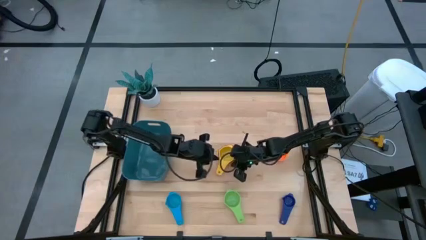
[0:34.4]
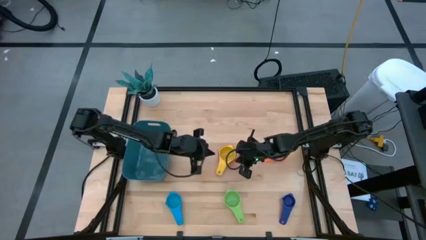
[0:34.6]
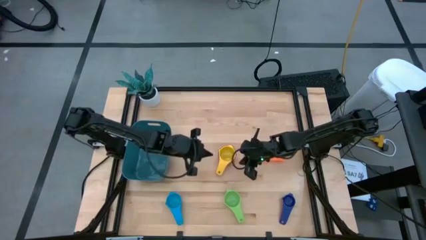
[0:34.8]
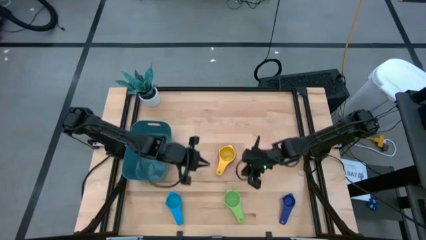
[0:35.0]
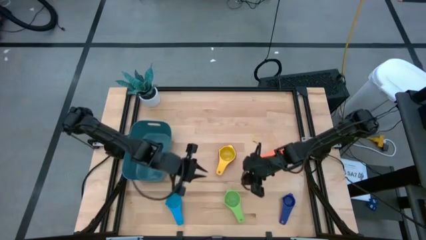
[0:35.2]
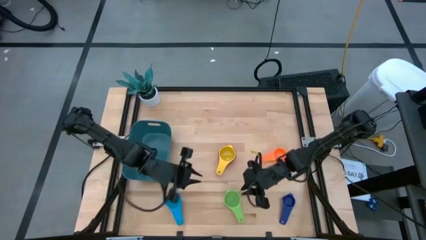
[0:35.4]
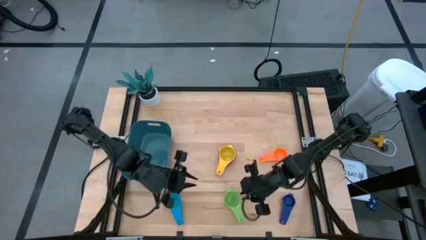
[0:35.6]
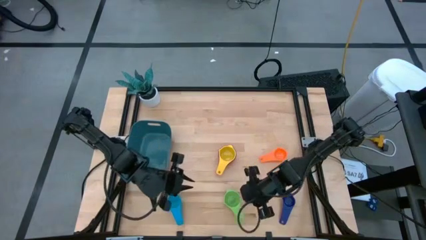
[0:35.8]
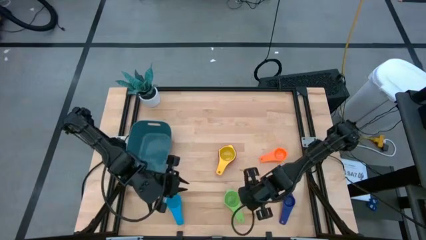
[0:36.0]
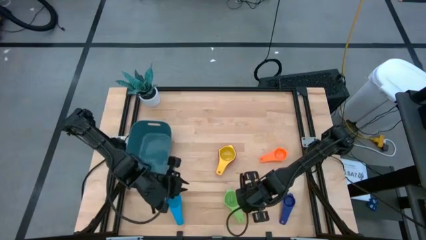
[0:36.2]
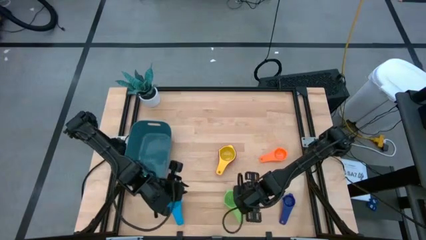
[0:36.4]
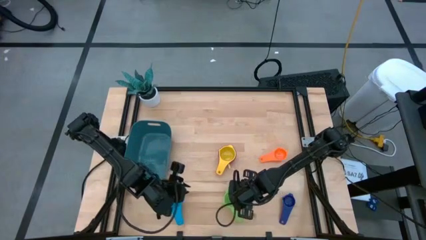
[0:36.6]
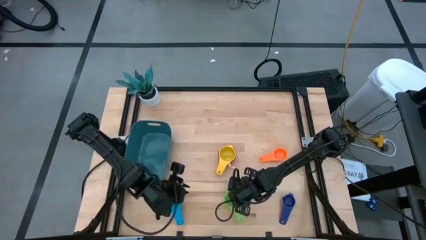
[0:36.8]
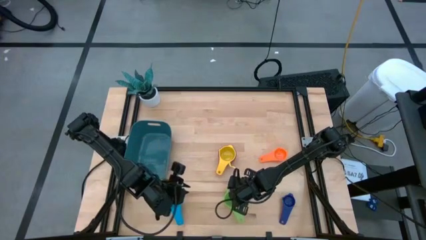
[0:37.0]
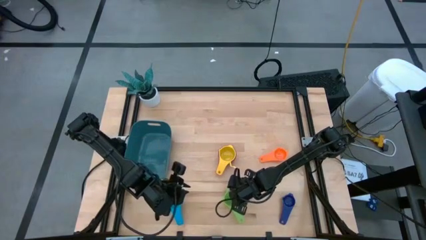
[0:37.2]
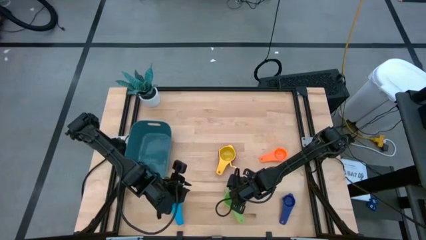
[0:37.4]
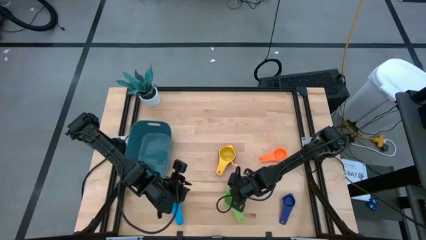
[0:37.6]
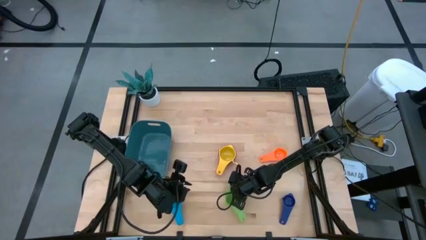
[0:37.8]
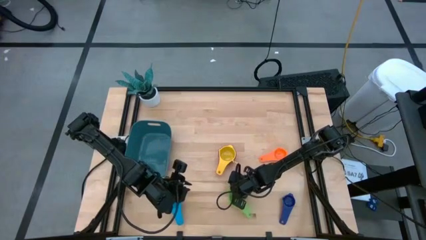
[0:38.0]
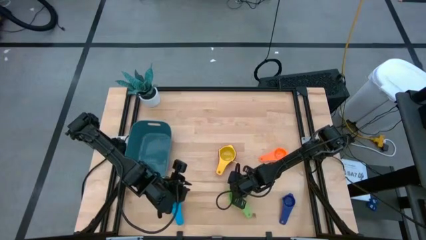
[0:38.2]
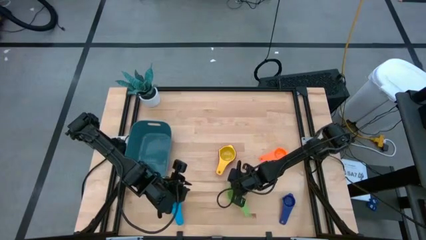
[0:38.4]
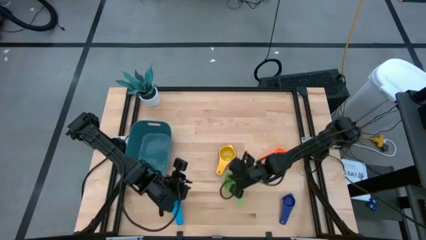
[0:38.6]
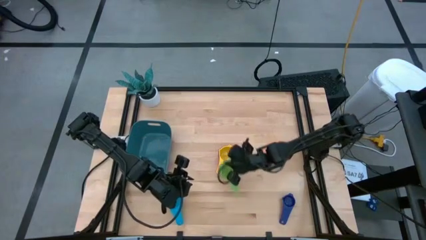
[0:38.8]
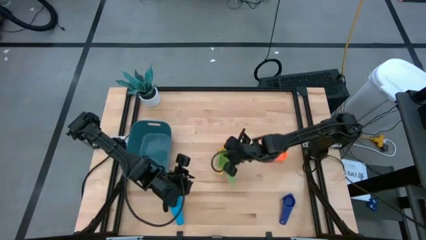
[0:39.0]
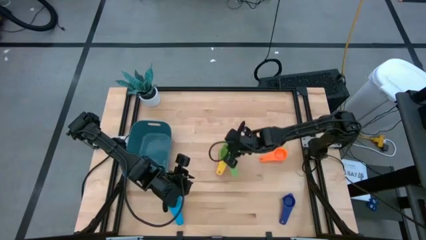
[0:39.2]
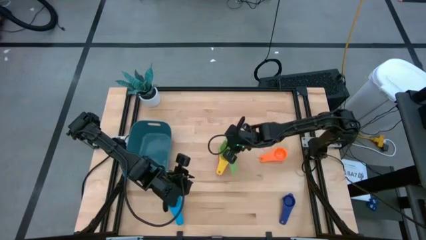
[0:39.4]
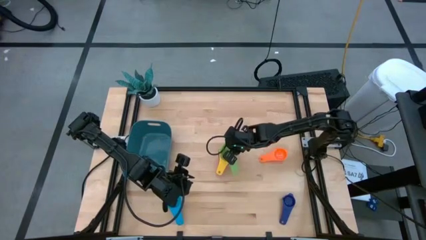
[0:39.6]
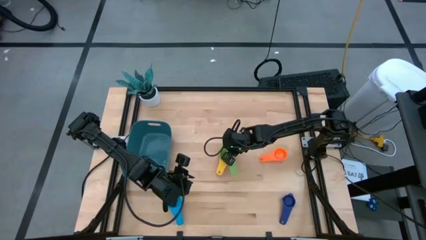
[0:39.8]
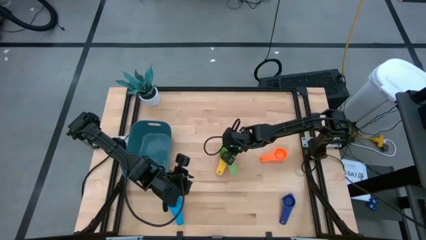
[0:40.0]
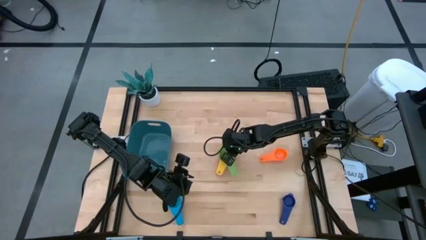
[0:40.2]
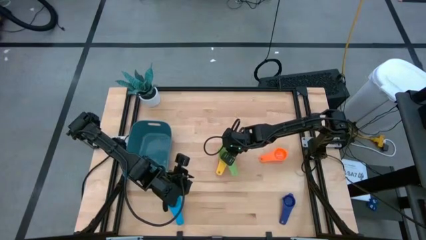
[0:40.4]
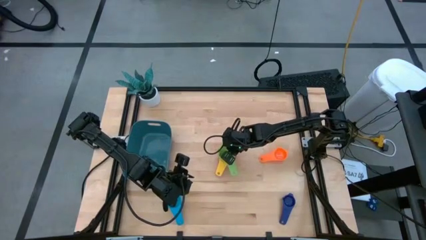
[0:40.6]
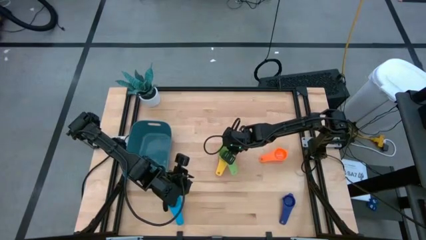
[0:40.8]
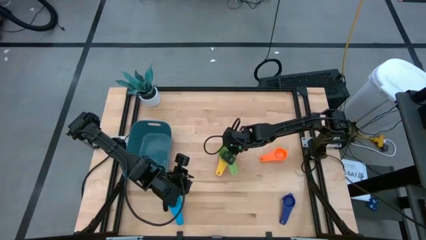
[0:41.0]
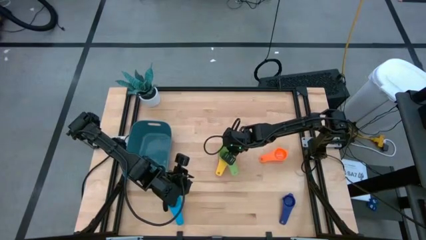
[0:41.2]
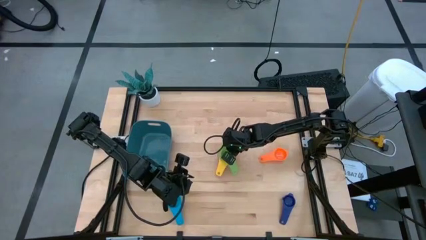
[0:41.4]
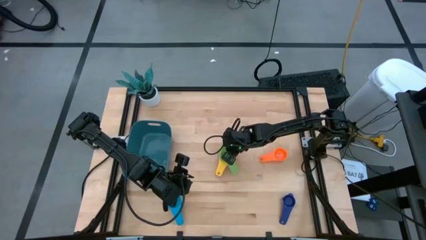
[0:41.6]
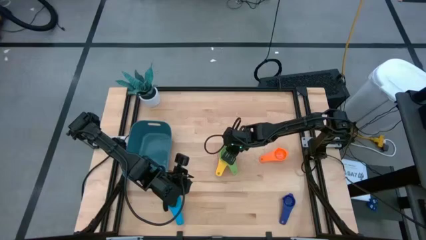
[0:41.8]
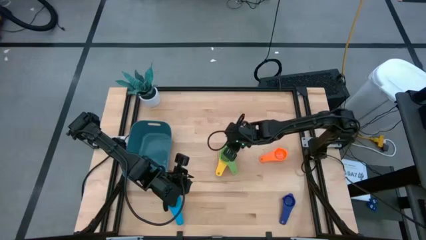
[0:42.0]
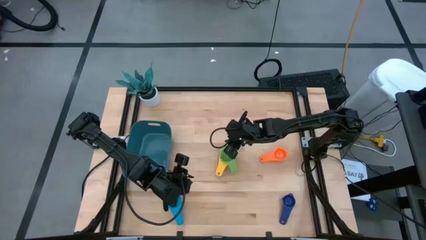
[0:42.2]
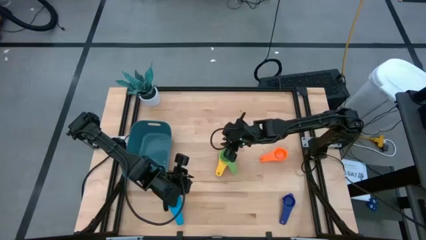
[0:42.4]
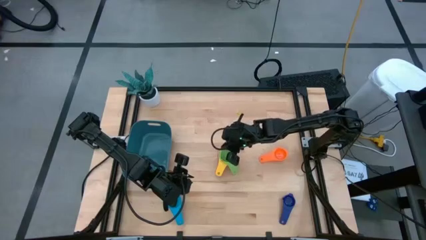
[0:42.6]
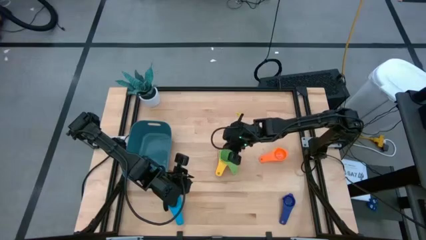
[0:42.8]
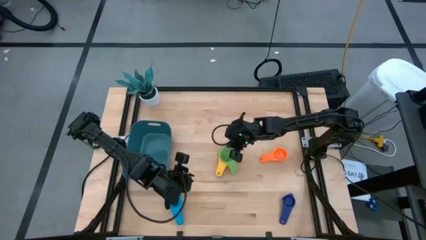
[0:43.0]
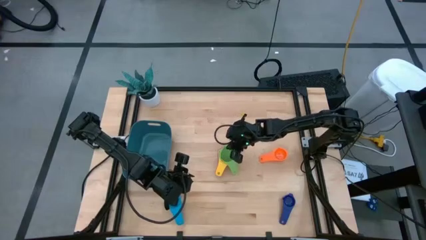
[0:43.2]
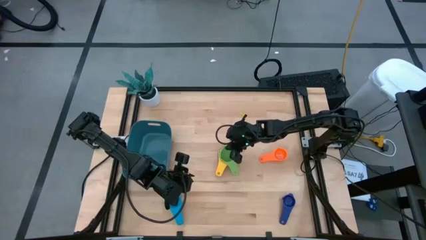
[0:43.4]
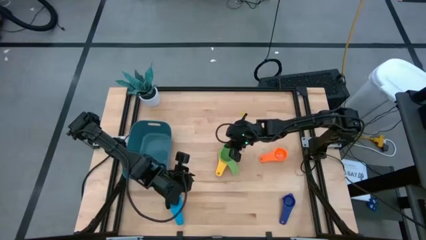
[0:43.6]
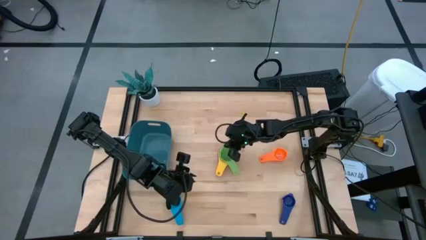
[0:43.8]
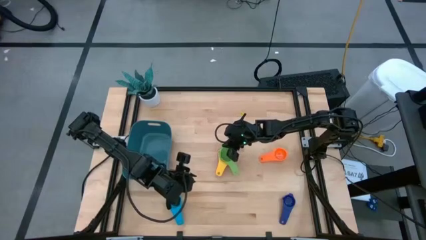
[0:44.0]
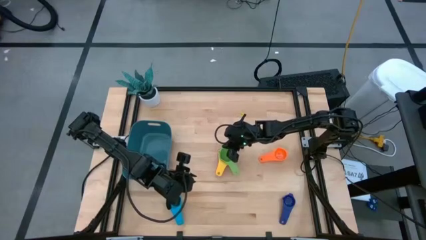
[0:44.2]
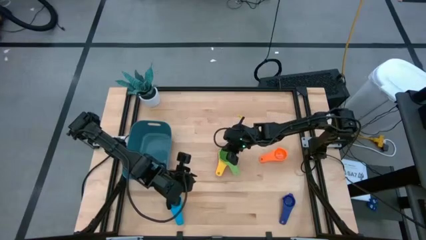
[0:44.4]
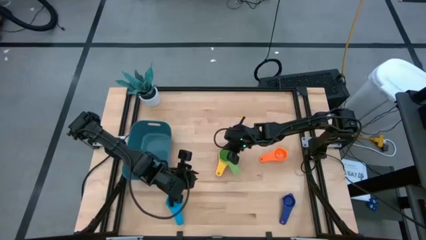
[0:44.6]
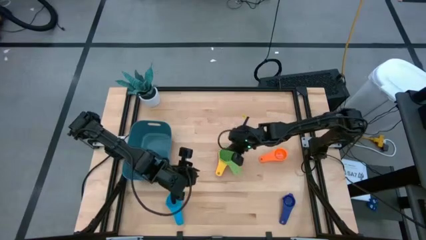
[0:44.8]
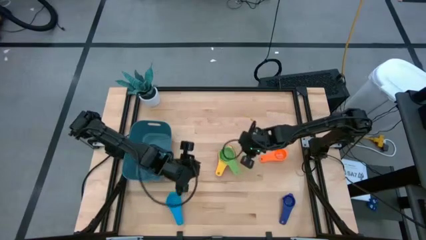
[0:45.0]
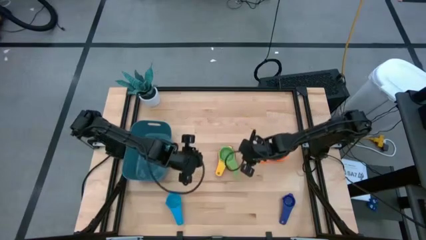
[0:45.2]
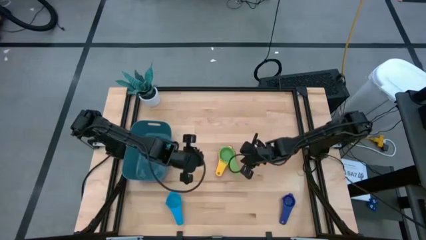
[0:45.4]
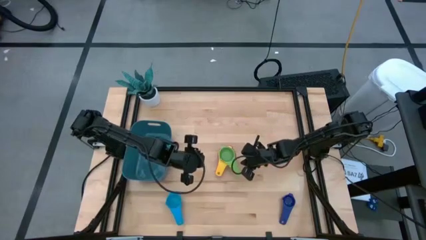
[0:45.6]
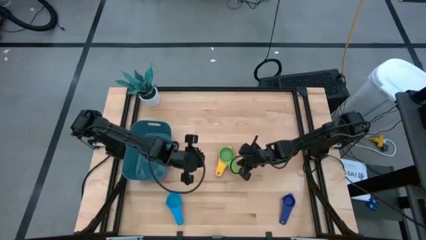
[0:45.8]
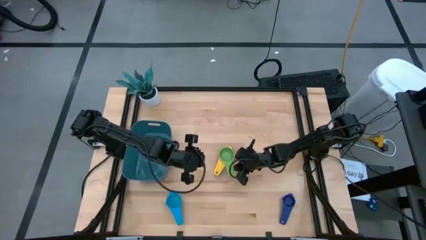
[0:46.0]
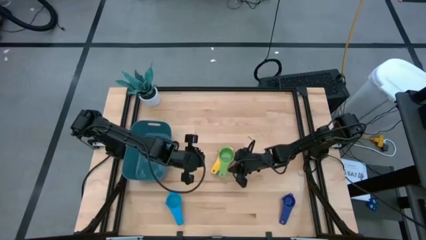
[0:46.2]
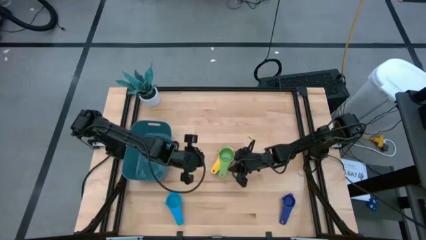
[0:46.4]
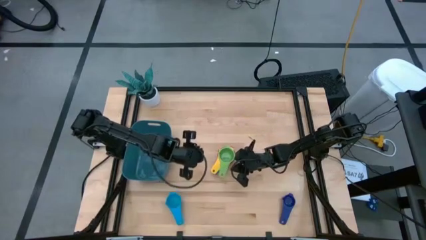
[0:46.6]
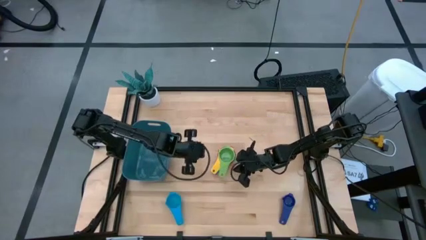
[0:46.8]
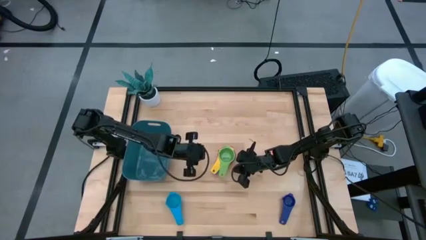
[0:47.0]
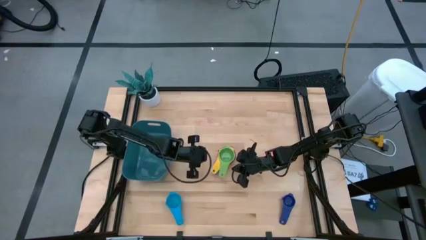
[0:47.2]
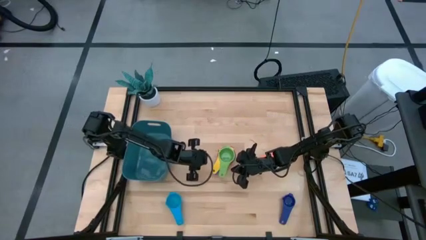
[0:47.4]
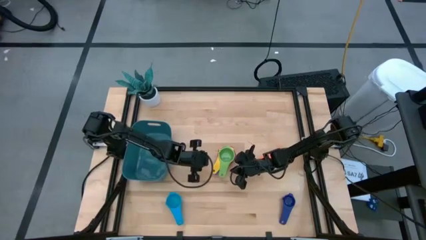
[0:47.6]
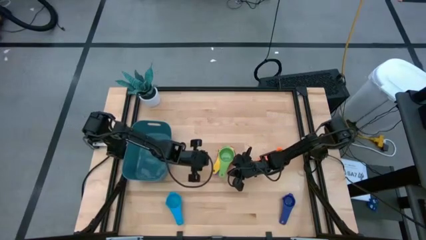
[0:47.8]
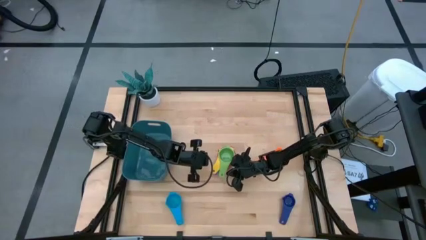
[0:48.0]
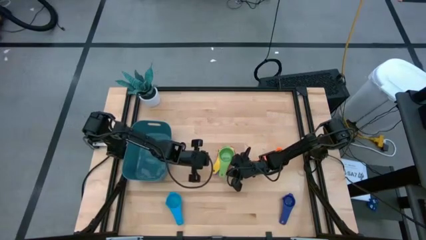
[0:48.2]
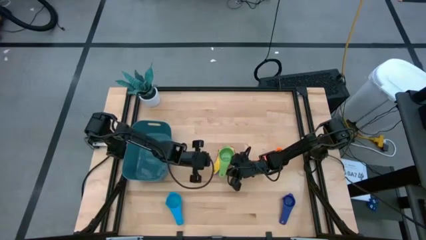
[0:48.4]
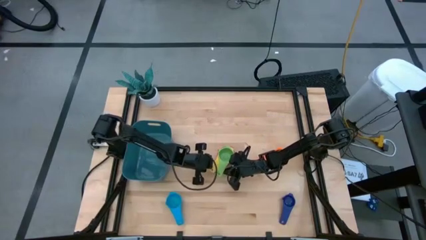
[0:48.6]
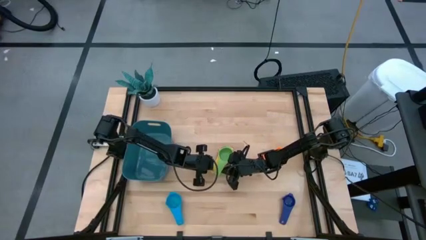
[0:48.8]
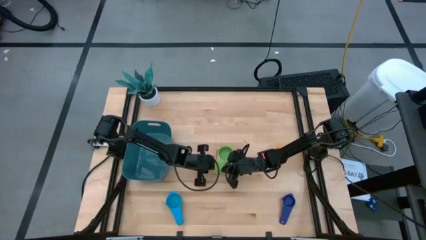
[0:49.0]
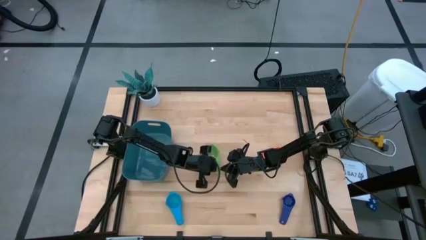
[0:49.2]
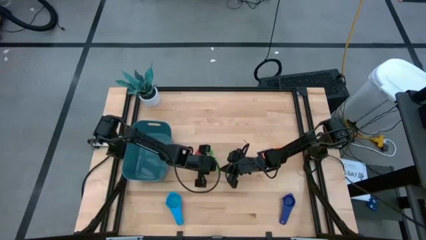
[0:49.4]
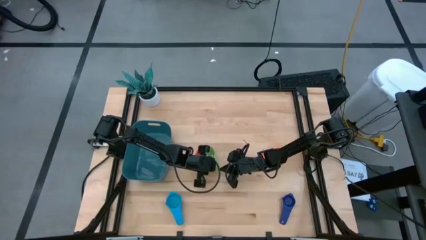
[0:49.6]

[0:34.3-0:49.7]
Task: Nest measuring cups in basket
Stack the green measuring cup on top of the yellow measuring cup

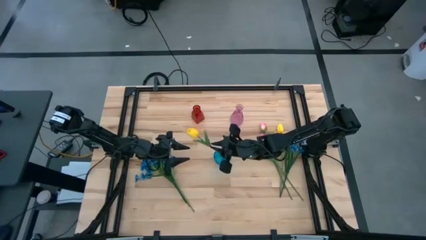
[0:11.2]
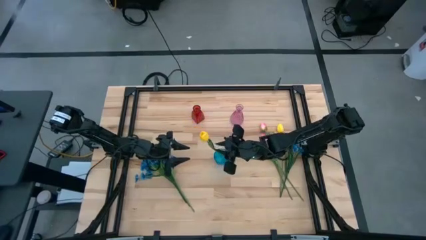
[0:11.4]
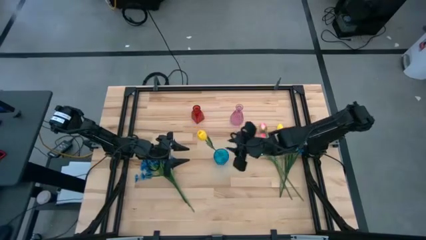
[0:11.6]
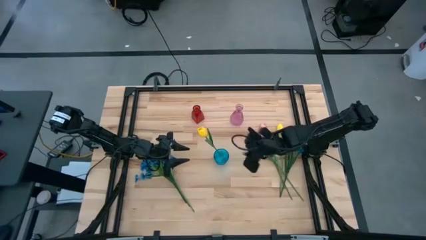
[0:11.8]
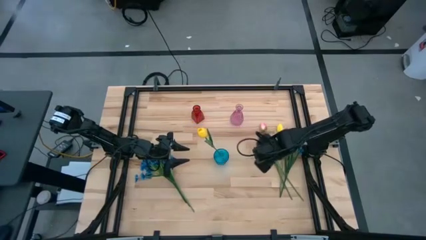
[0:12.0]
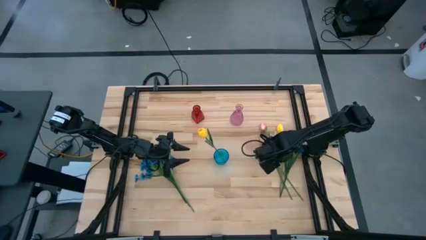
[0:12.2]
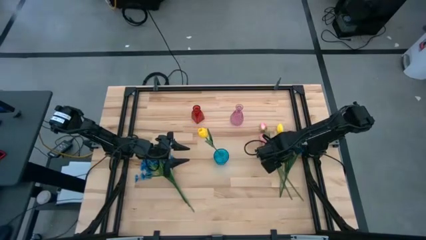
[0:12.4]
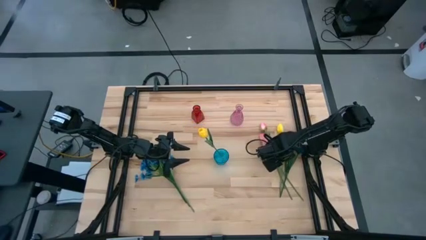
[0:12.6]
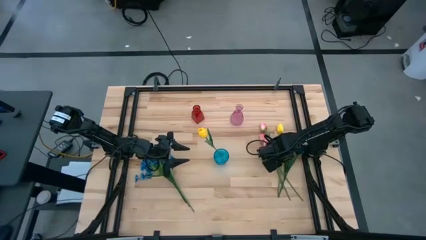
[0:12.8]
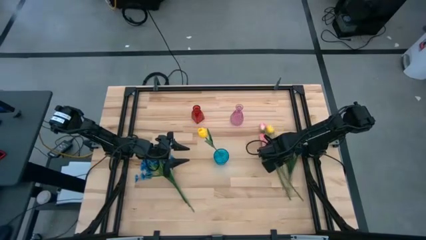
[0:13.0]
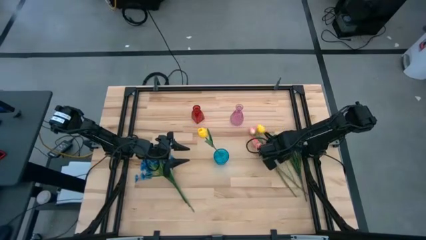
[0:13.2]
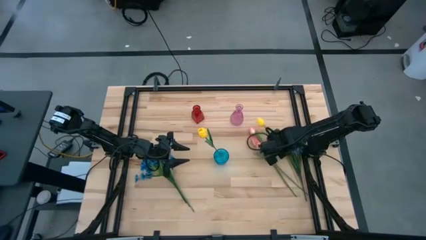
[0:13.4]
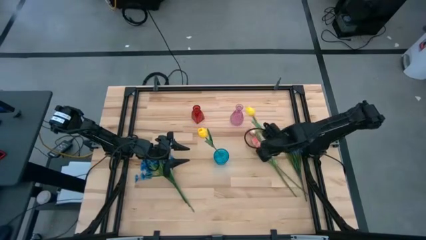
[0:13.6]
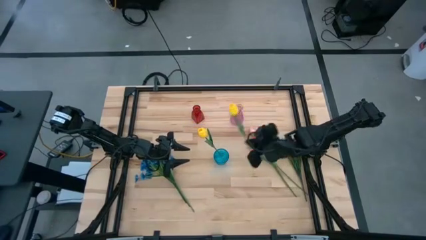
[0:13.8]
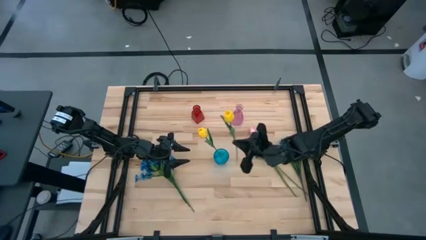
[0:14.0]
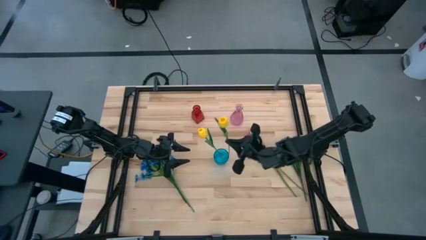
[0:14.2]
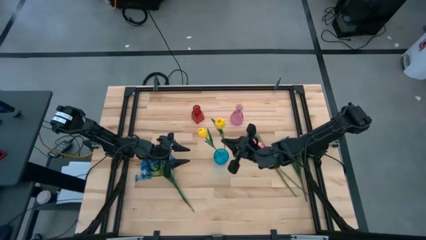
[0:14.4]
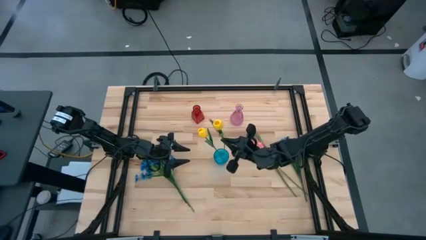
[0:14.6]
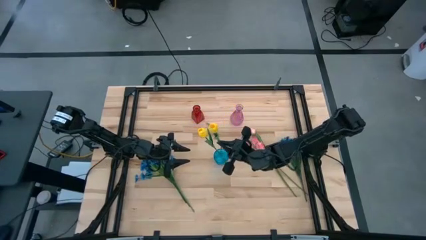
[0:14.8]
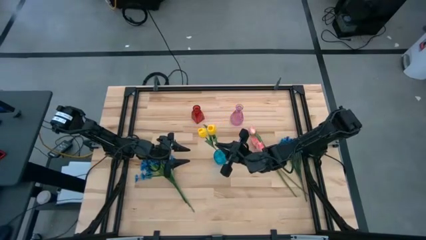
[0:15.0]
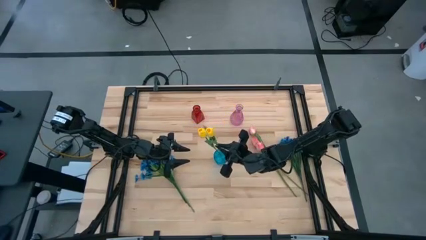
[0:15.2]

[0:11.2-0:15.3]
Task: Sort flowers into vase by color
Put the right yellow flower into the blue vase
